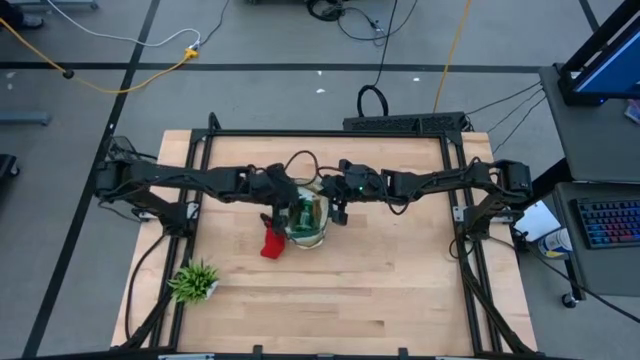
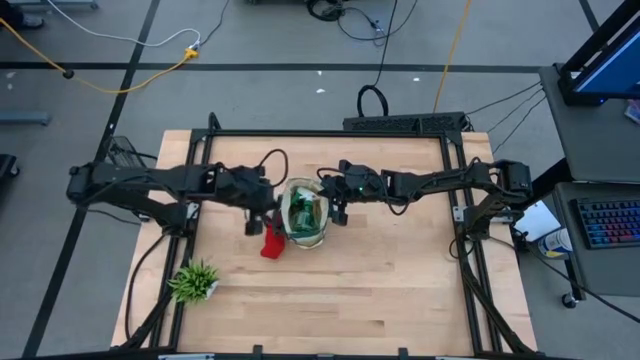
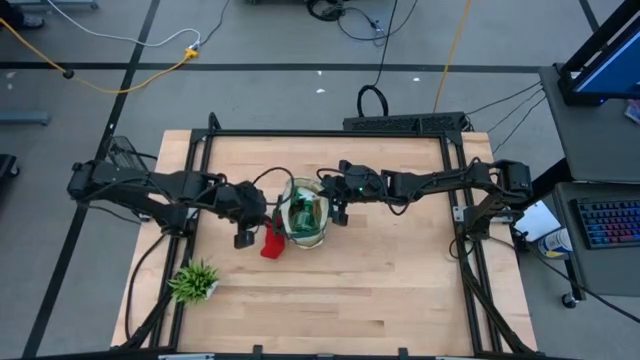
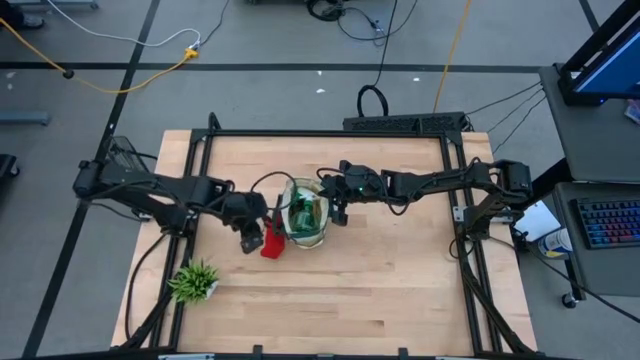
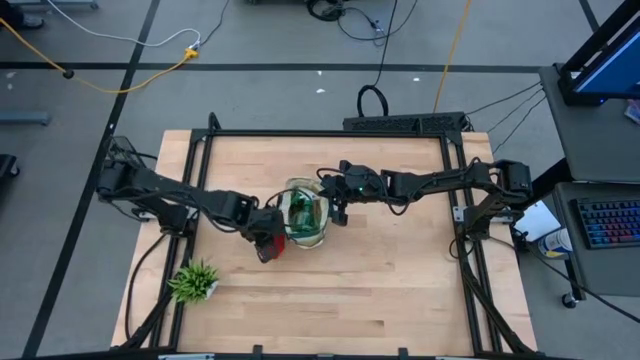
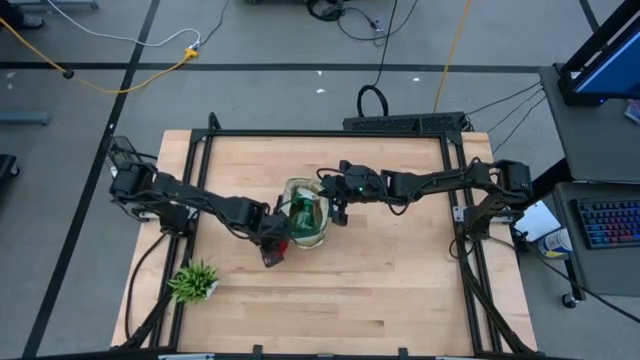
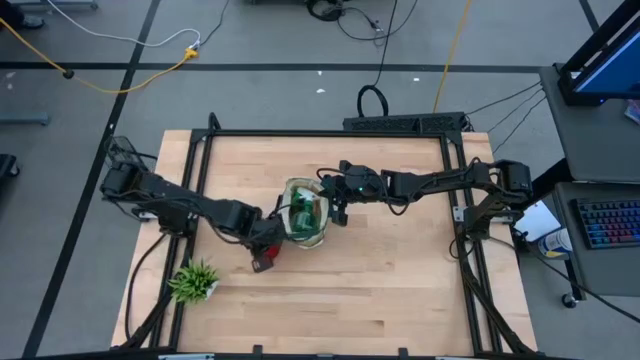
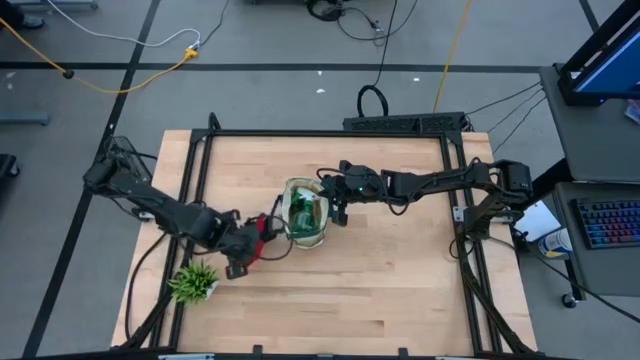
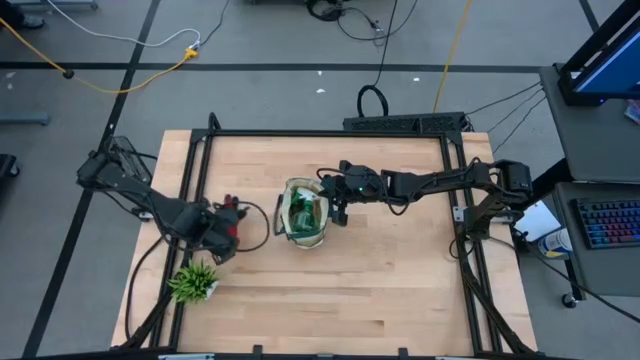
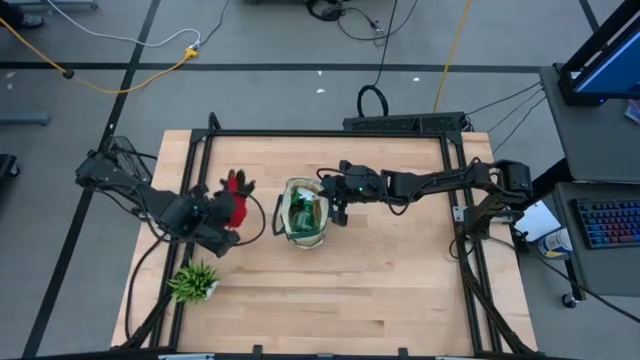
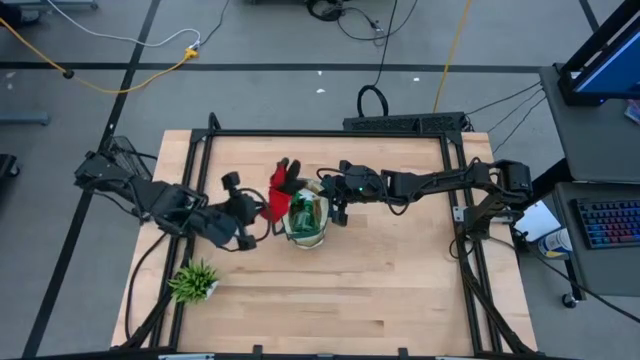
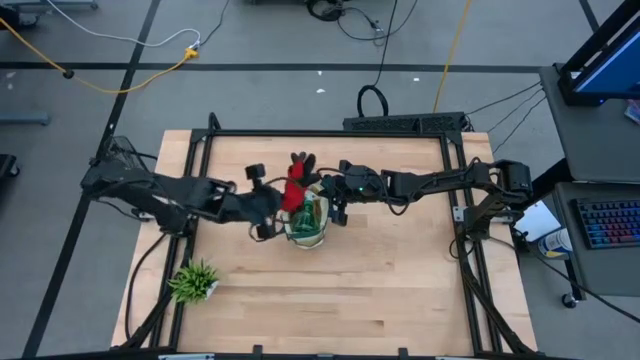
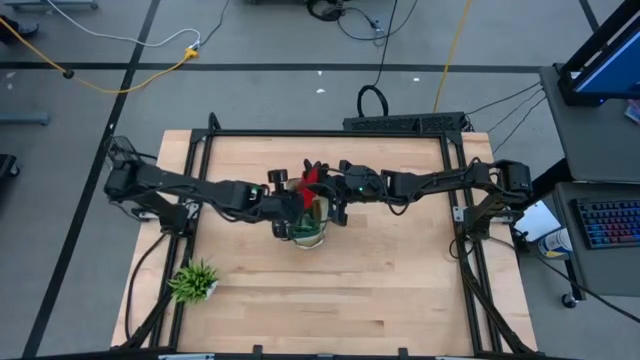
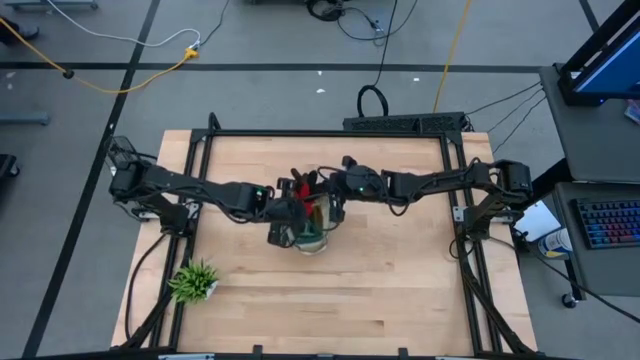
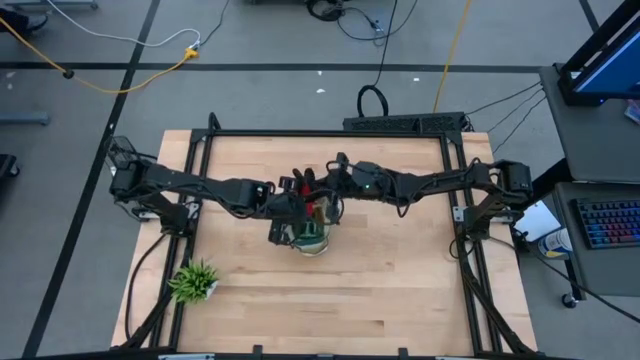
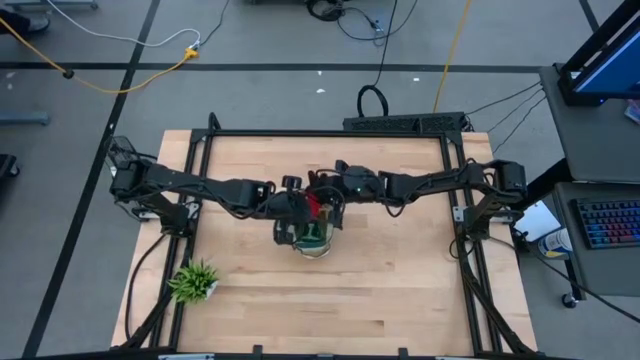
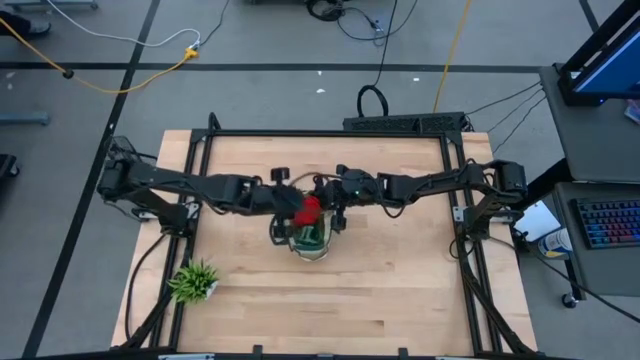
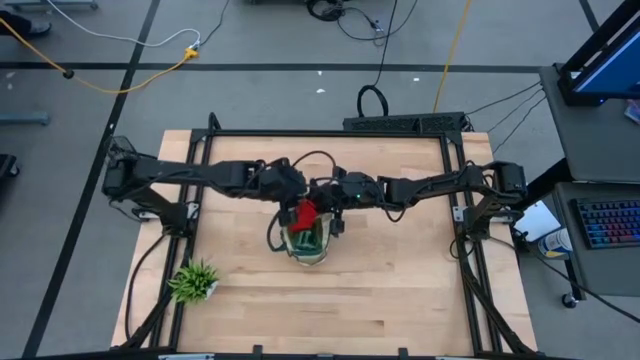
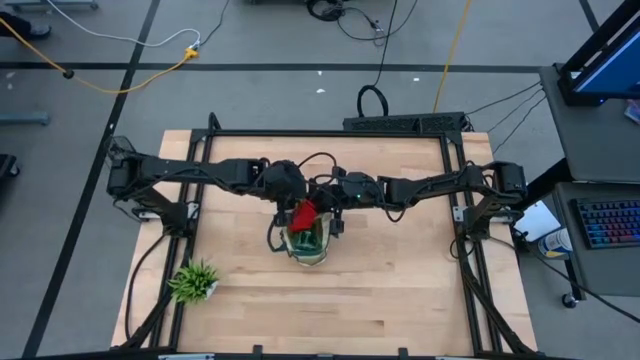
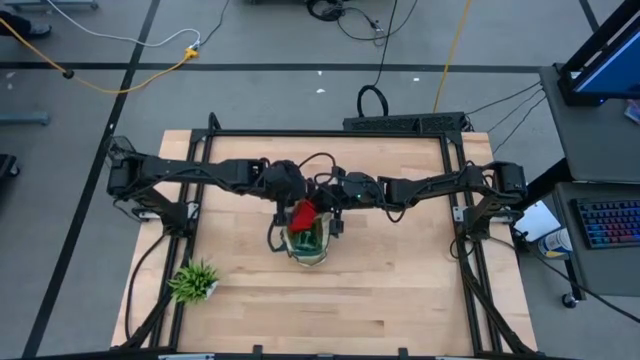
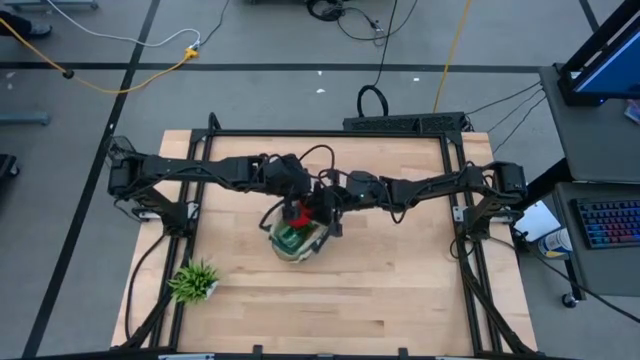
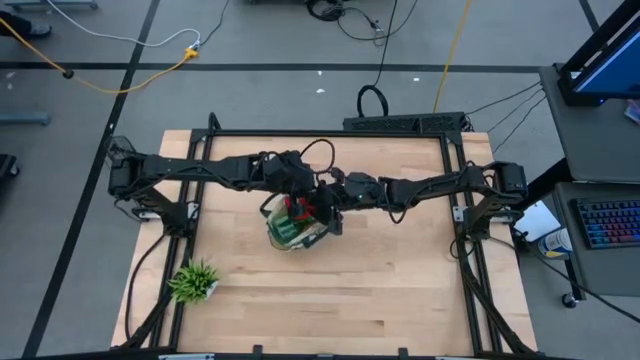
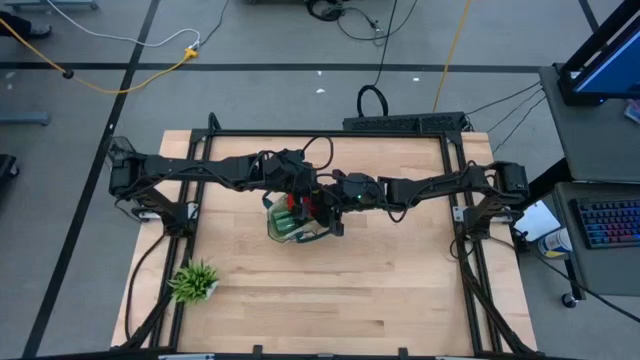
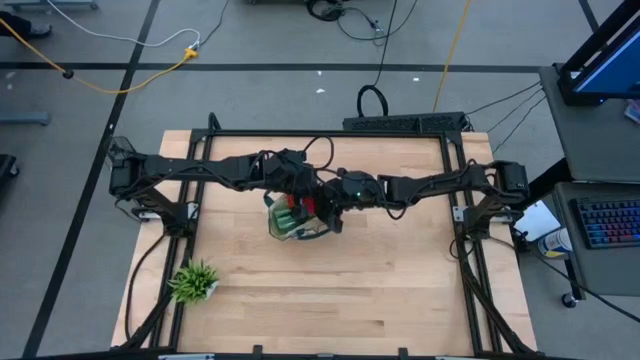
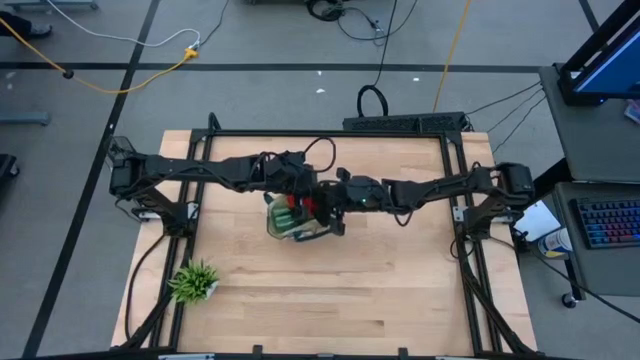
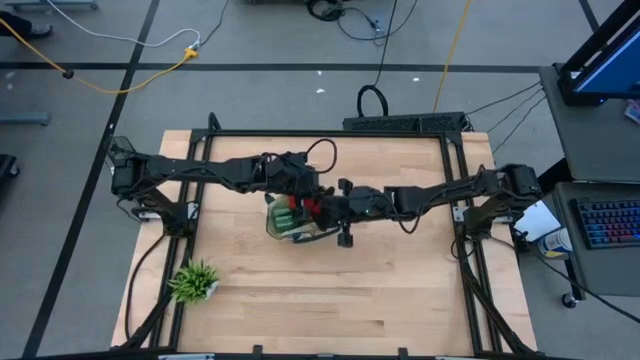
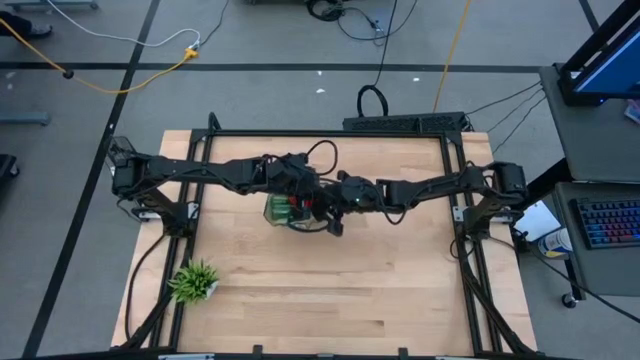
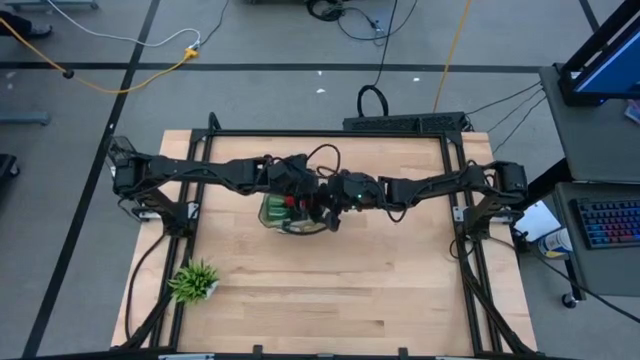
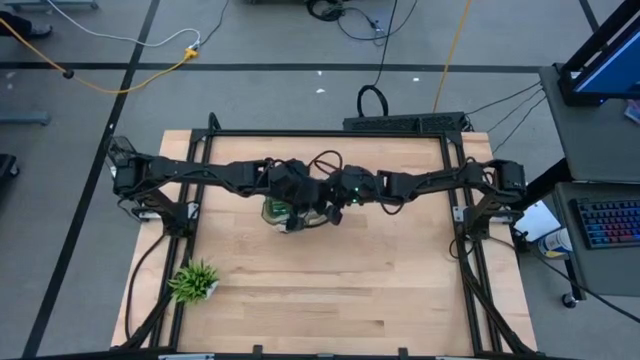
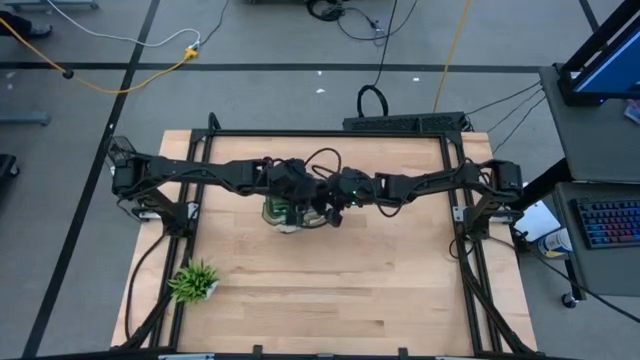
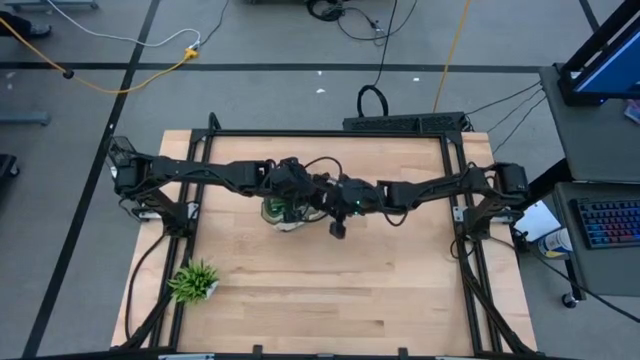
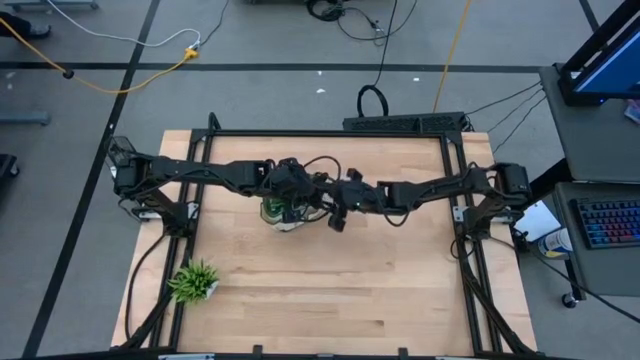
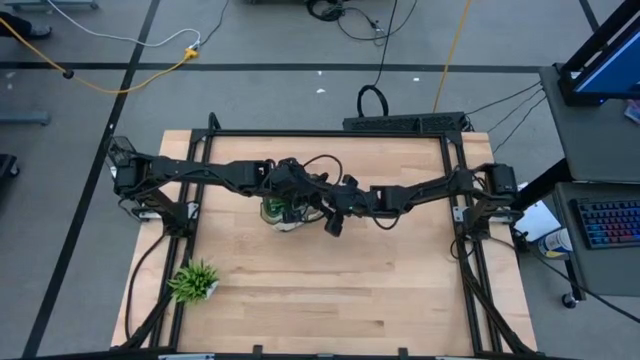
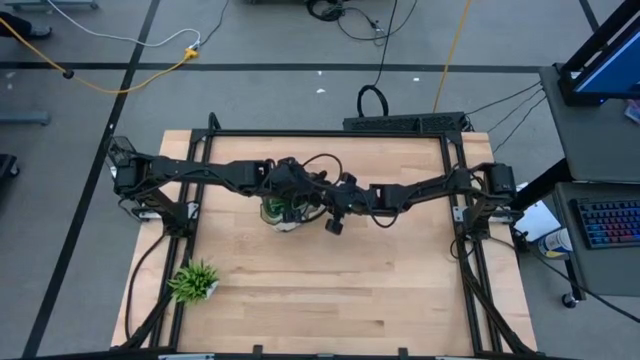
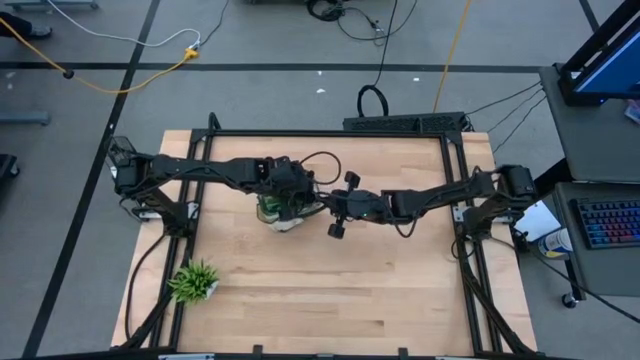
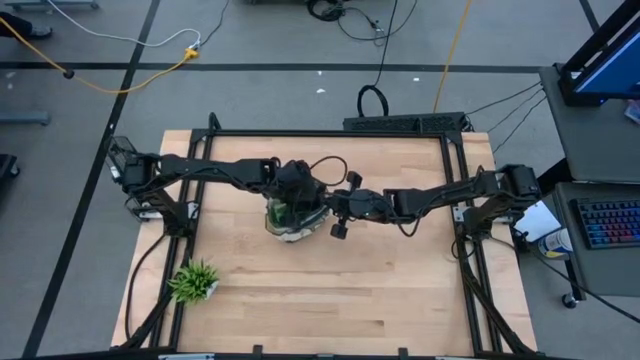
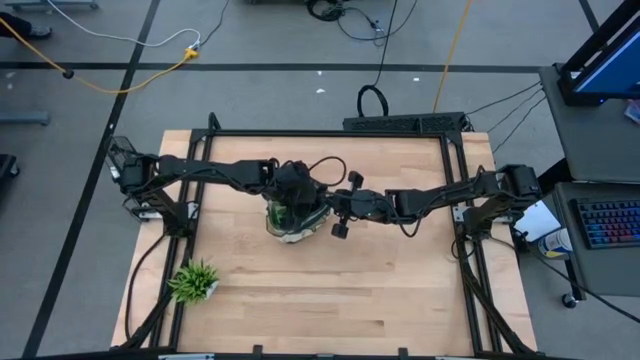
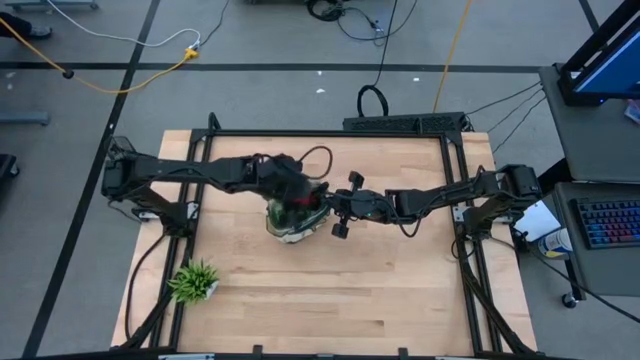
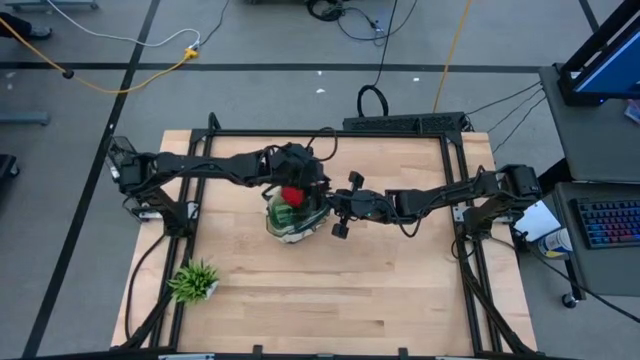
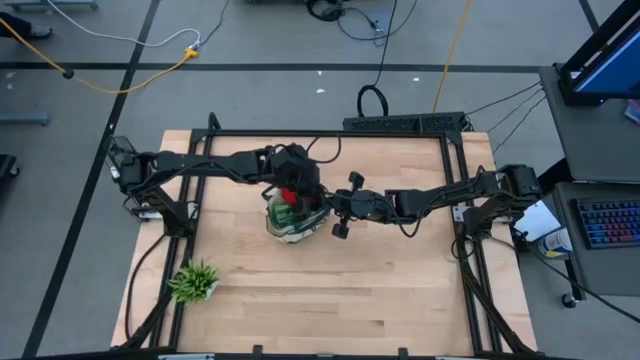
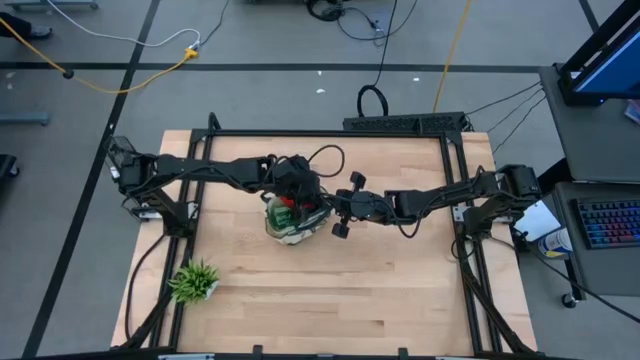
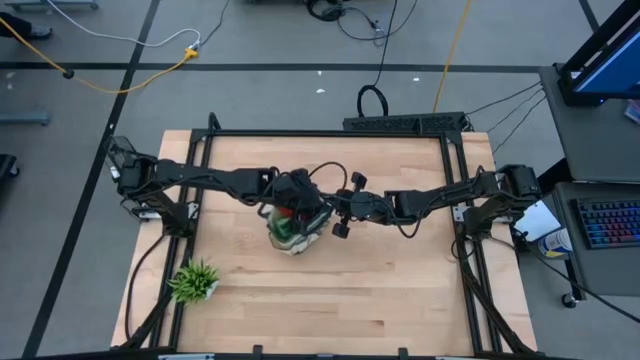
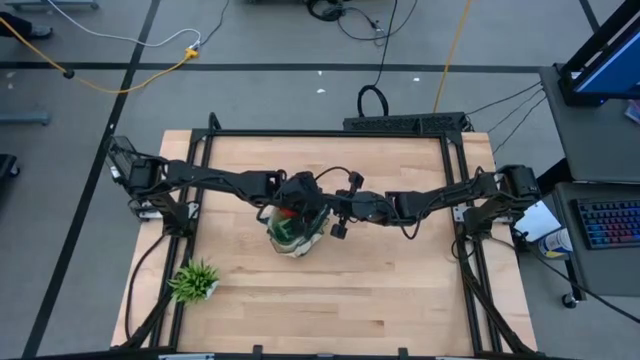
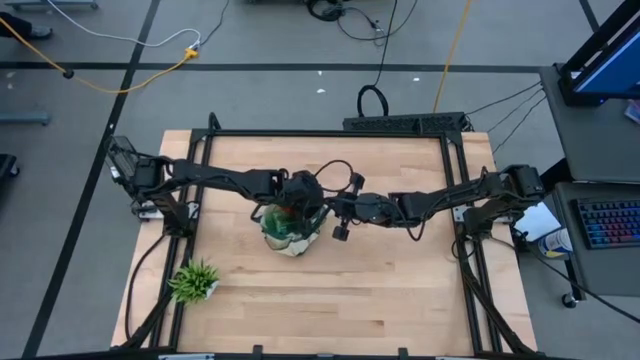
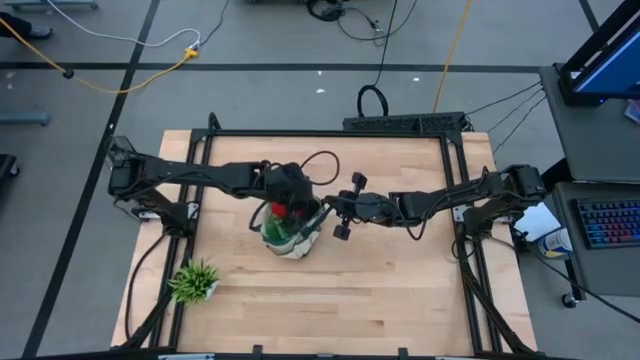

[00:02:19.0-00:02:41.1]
Task: Pick & Place Garden tools in Gardening bag
Put the red gloves into the gardening bag
